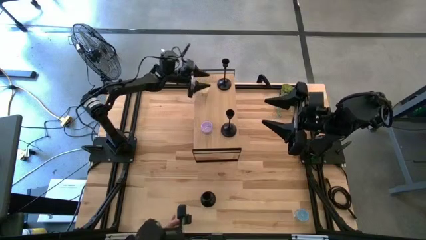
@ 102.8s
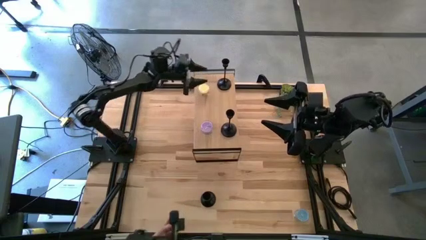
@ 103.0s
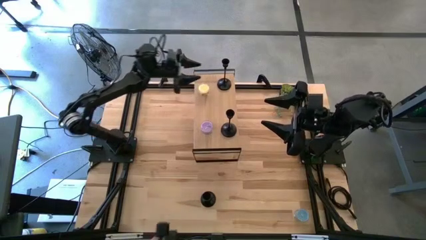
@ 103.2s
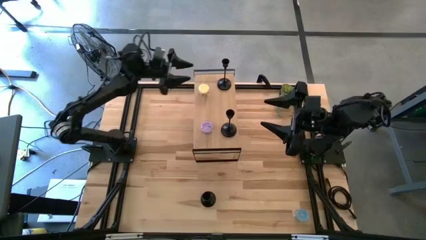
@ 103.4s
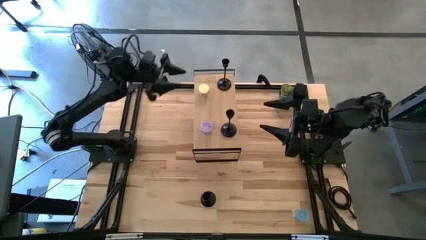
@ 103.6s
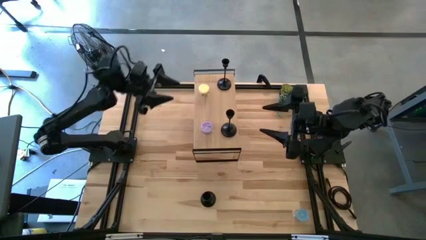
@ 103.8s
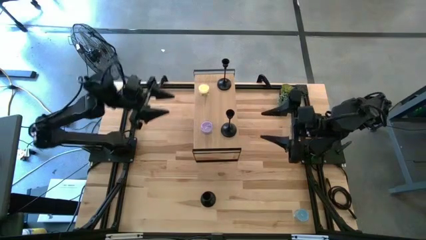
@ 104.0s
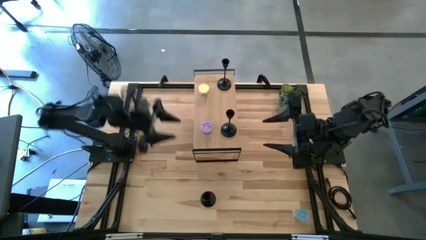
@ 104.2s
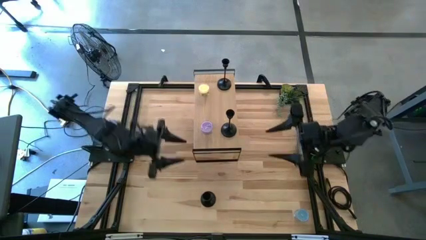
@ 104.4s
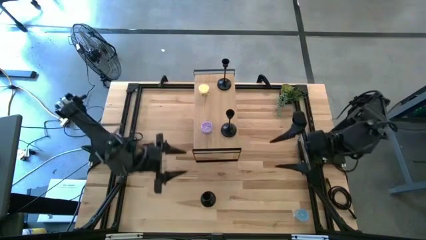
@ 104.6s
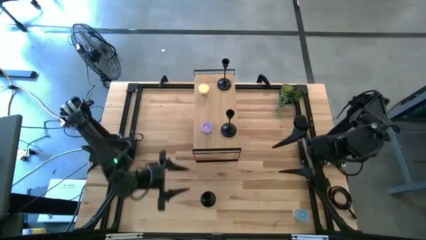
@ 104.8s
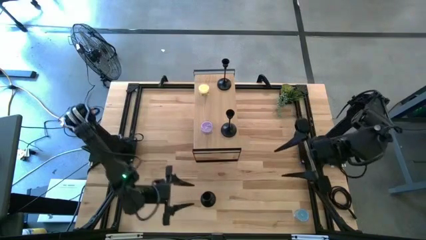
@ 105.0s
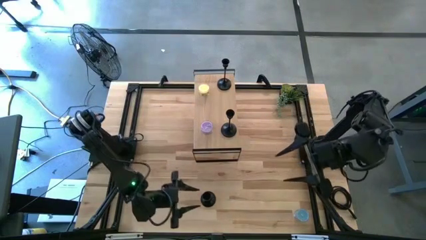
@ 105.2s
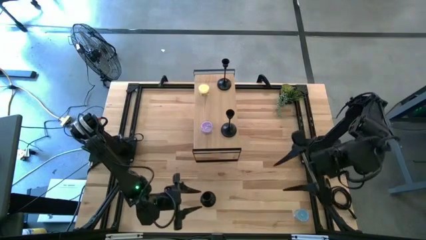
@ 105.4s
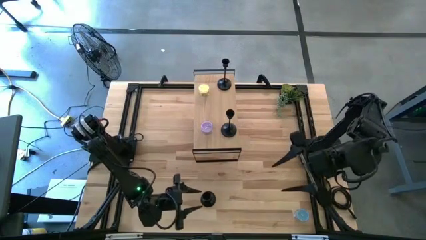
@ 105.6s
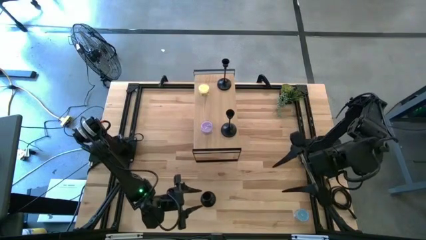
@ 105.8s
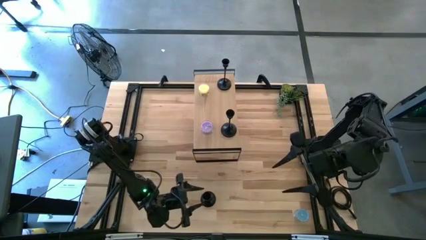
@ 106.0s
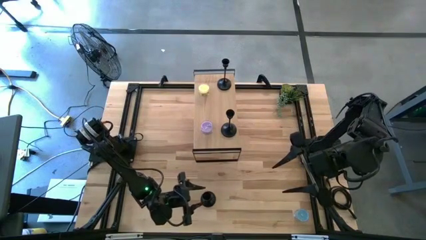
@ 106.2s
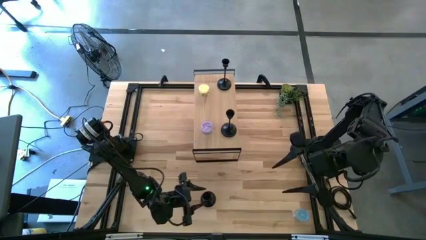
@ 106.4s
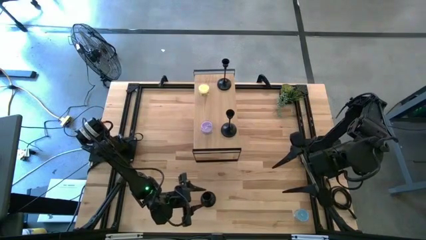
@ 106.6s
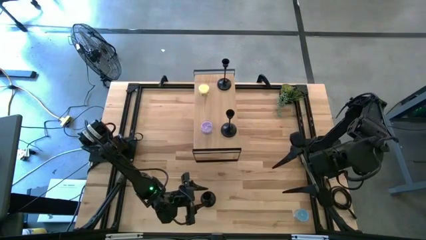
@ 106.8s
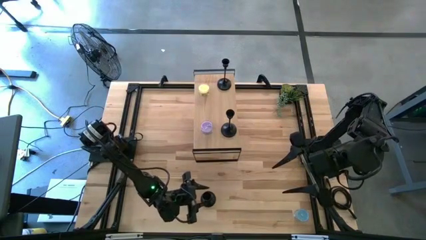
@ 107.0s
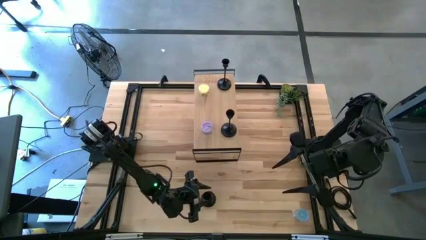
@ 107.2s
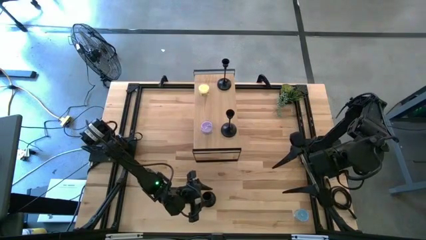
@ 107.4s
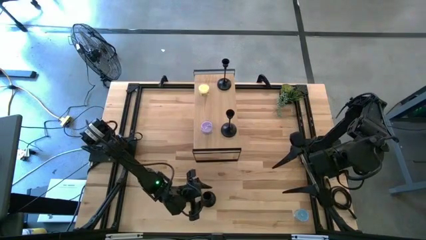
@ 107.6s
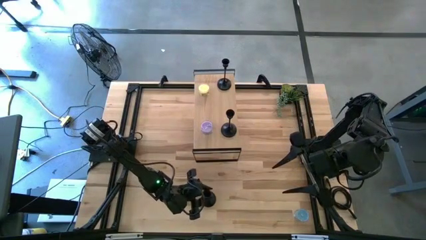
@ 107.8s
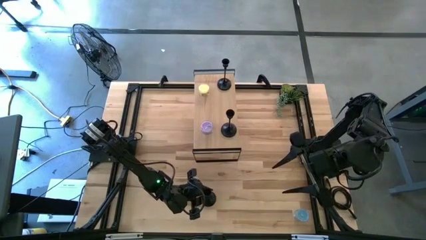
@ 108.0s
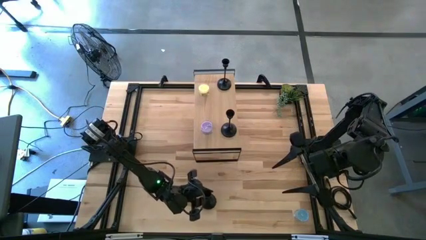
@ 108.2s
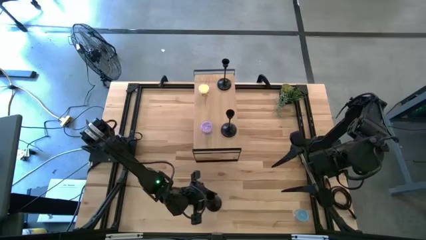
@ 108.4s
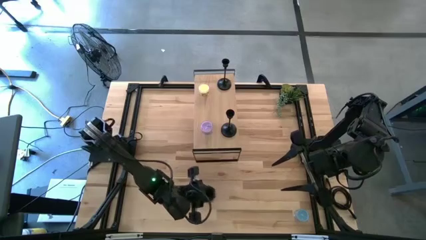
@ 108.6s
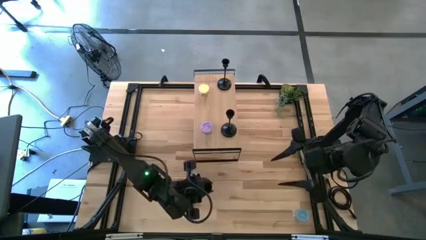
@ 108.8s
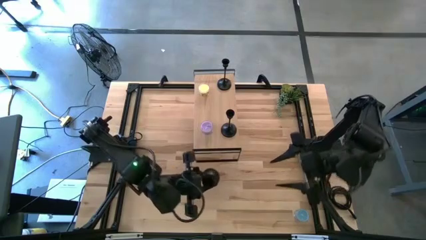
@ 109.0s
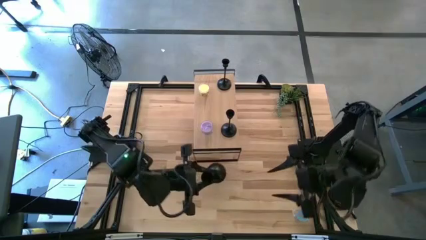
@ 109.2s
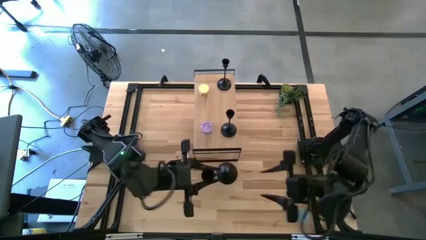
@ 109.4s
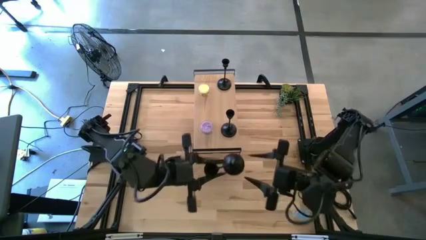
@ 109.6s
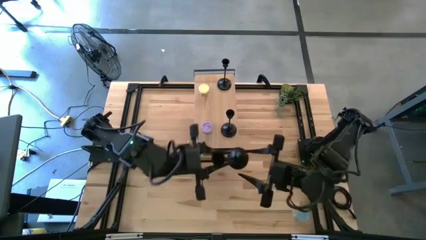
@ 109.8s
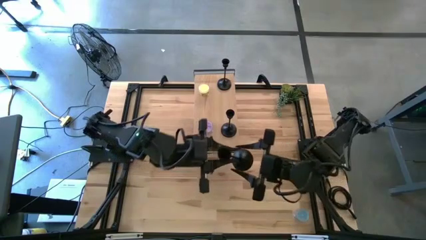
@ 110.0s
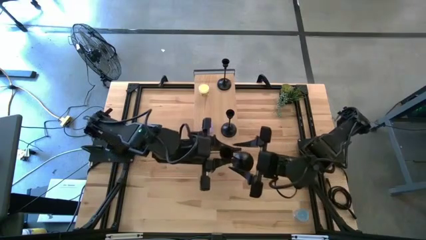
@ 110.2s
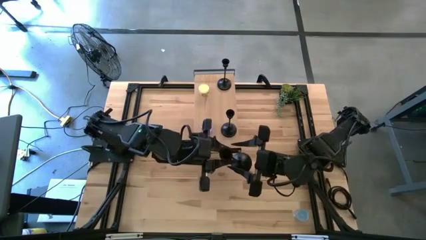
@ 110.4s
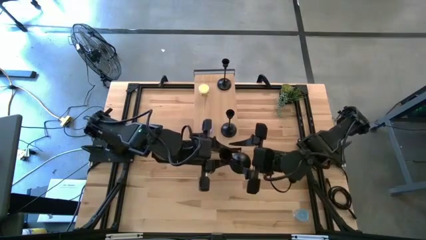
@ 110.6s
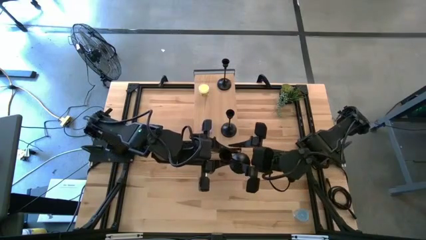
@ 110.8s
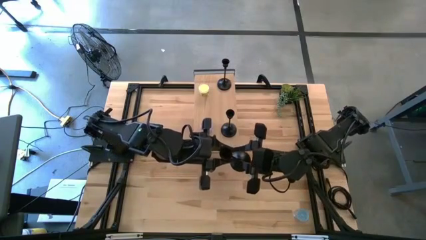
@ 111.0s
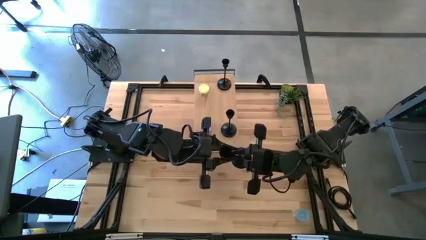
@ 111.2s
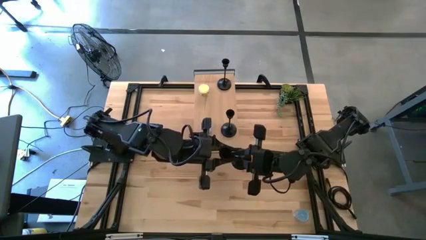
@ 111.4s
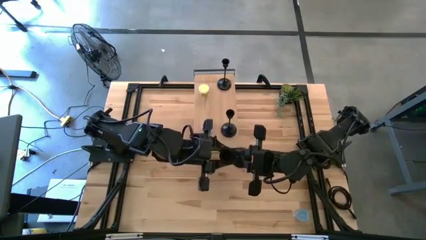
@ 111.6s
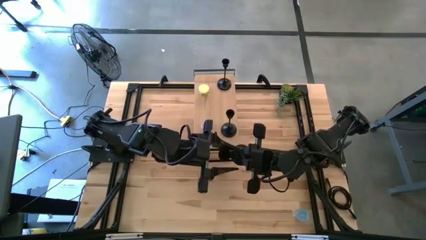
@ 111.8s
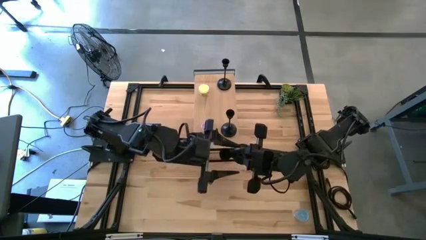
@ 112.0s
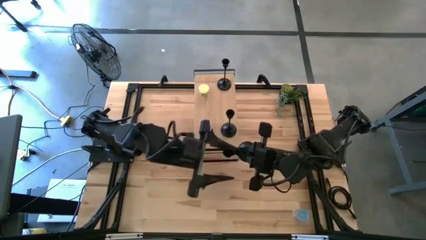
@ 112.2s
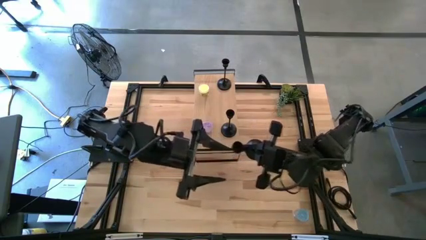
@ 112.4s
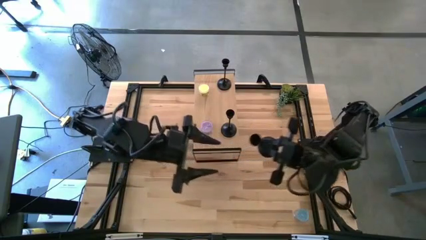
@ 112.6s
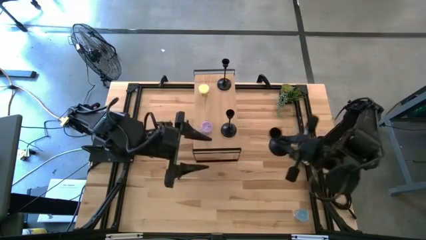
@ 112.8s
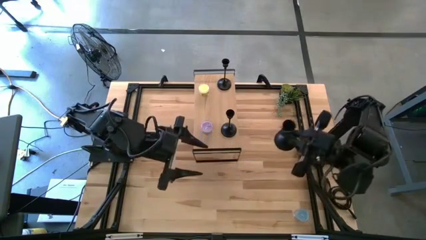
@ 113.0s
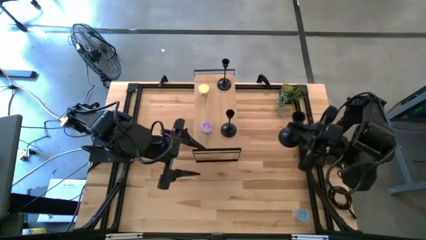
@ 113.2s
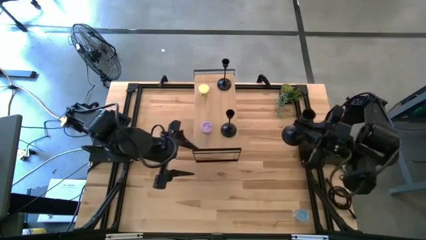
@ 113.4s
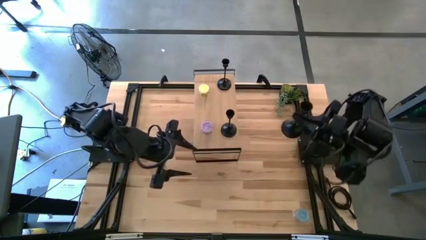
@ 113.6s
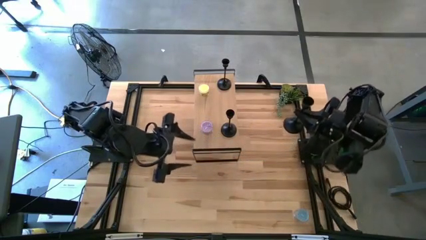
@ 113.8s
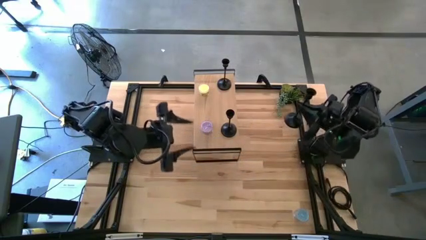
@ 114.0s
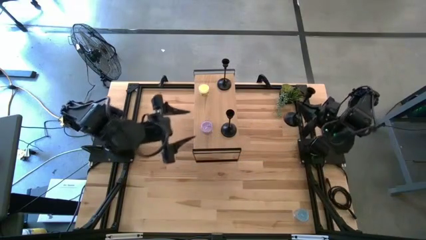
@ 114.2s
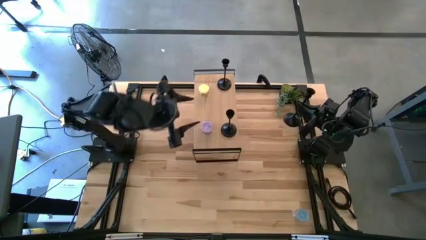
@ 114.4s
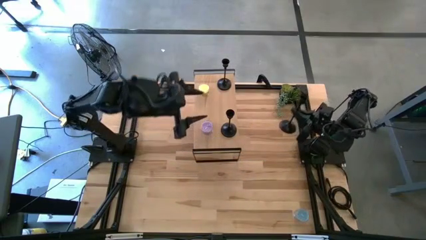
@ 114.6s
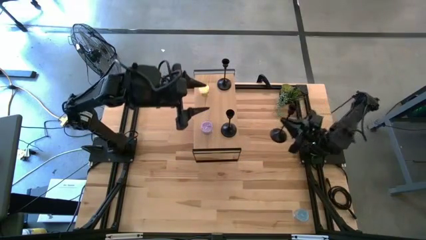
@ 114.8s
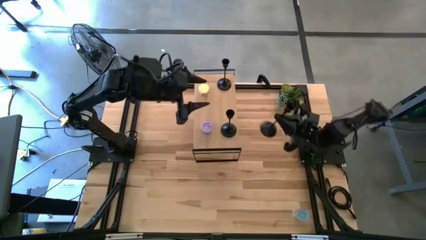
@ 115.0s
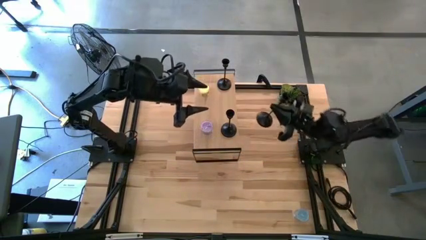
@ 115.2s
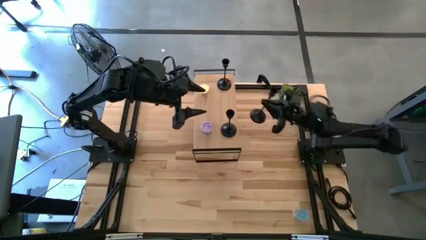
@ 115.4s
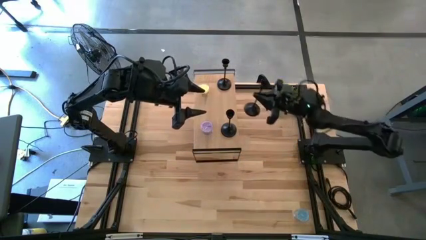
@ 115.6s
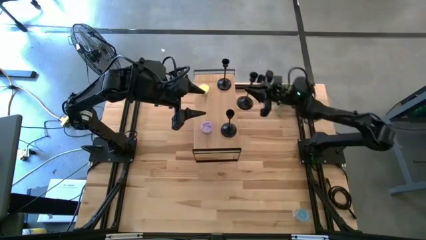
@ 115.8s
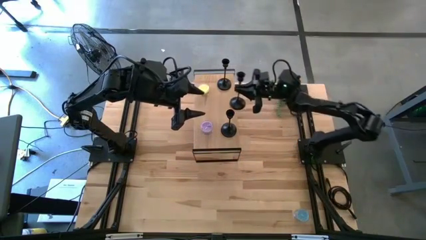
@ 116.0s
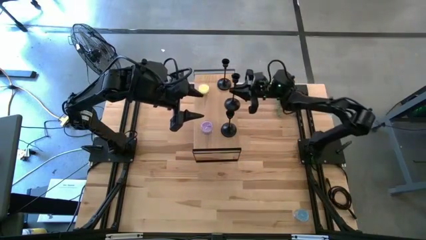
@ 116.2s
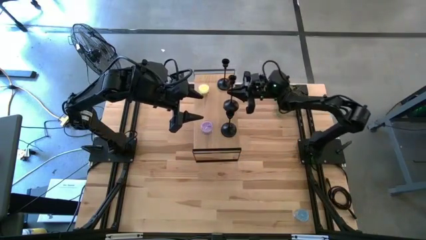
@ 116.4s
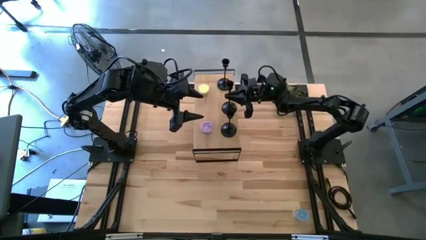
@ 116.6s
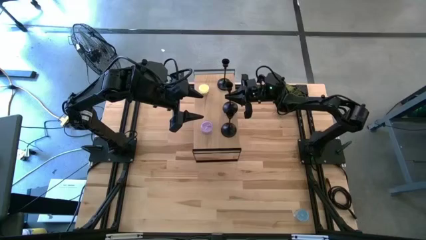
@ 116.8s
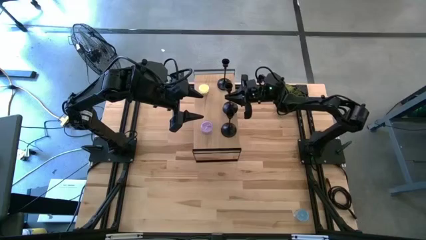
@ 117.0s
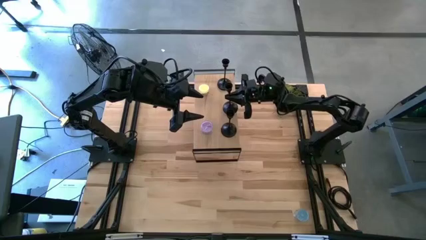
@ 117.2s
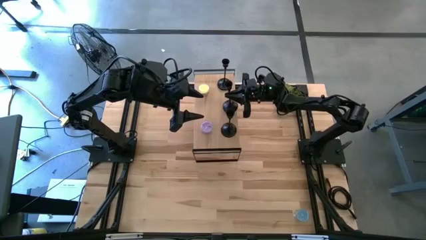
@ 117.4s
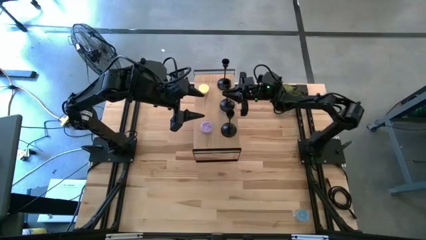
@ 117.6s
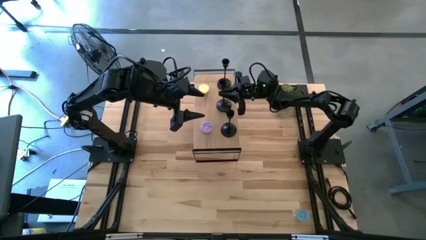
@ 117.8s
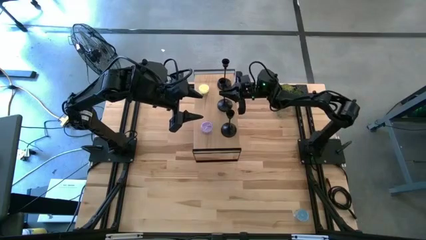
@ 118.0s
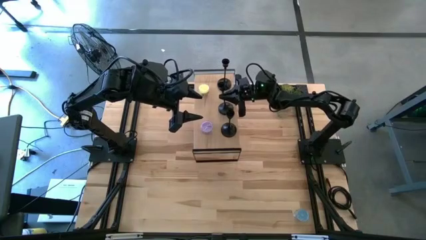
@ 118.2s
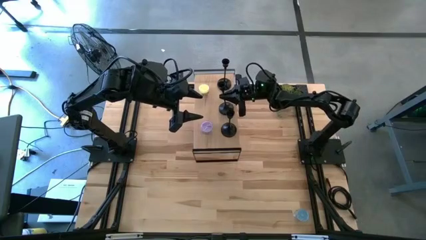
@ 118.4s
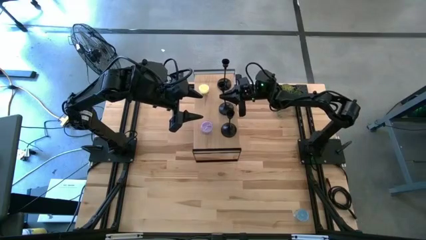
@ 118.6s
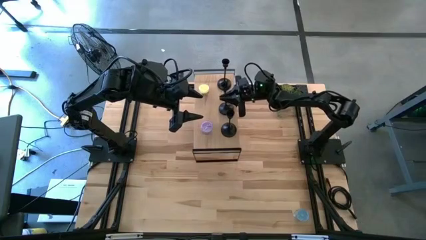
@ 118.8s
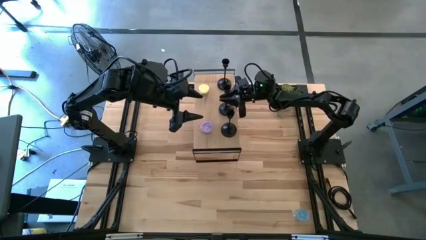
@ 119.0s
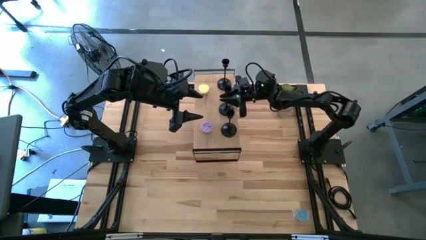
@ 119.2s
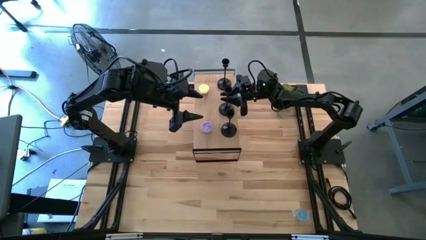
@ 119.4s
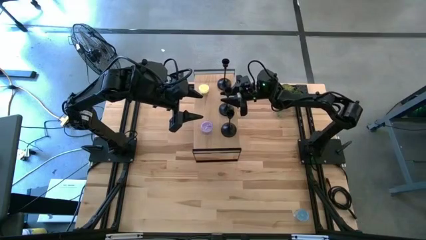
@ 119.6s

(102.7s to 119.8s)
Task: Pick & Place candle stick holders
Put the candle holder on the shelf aligned with the other candle holder on the shelf
